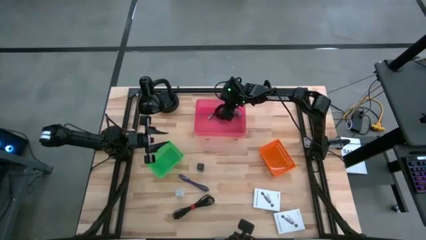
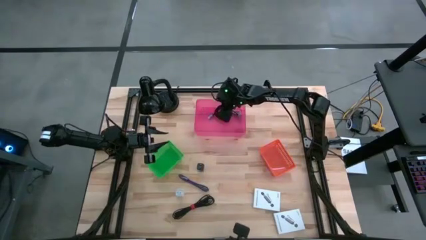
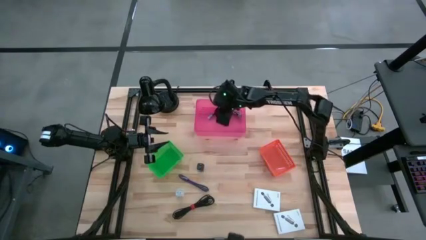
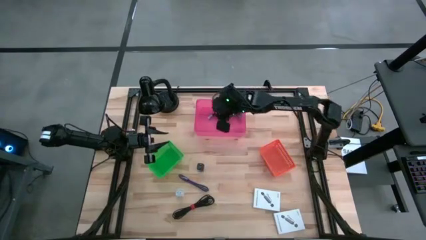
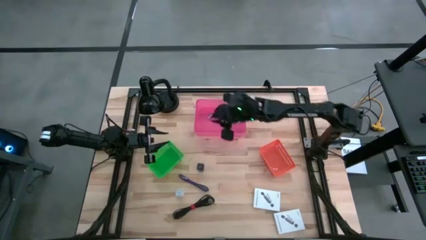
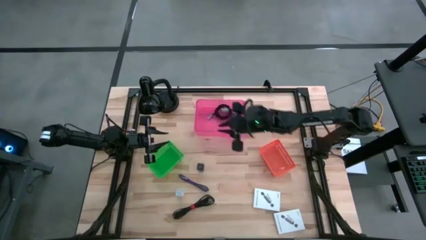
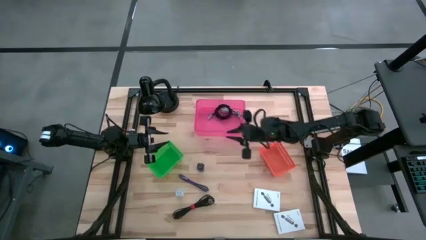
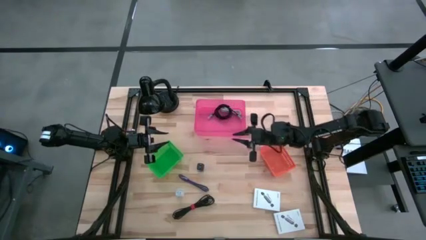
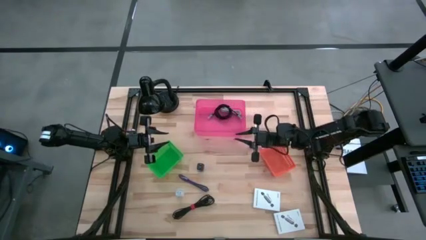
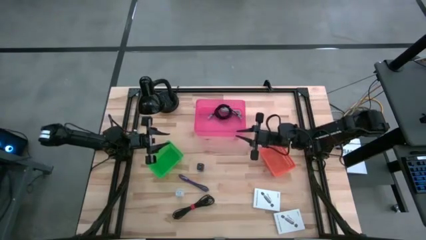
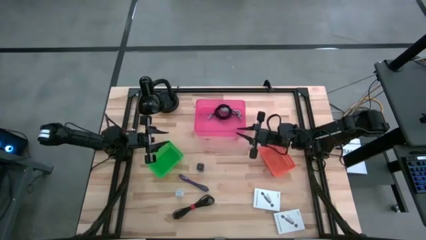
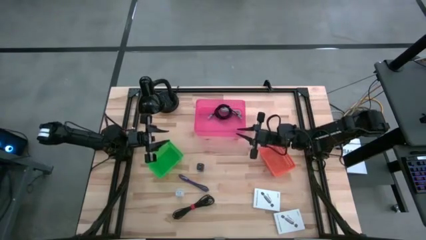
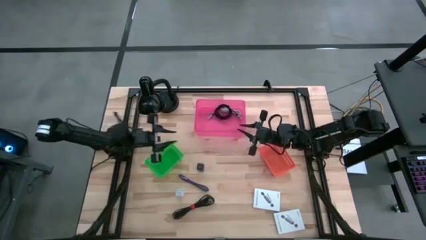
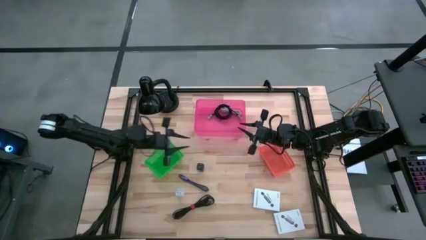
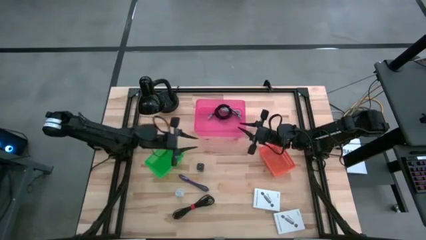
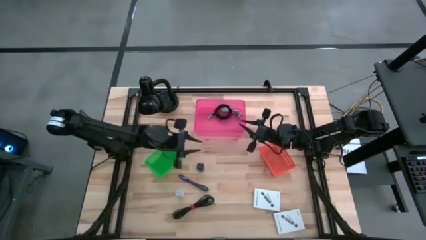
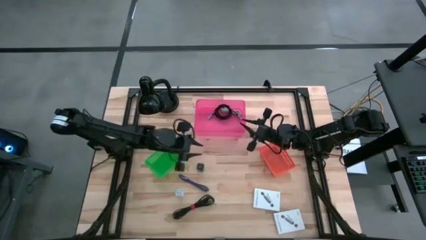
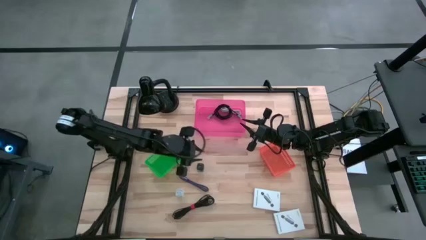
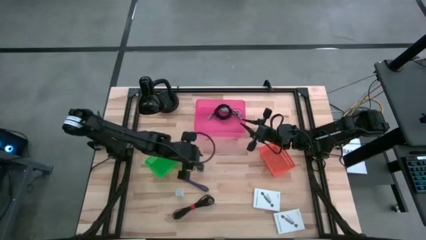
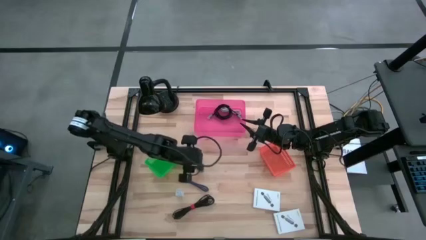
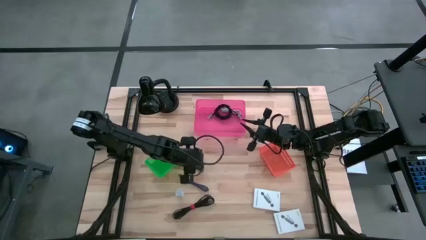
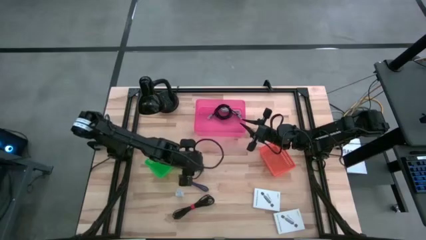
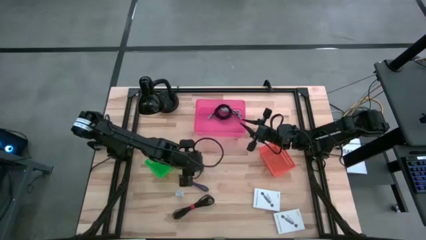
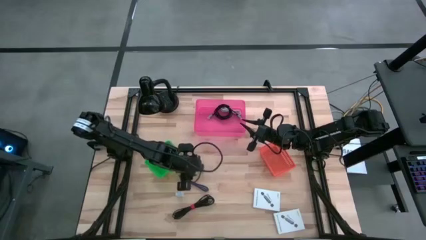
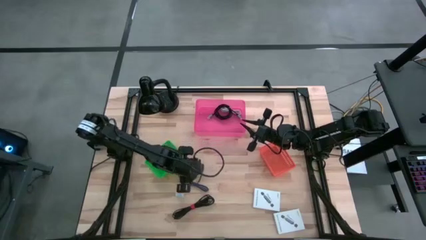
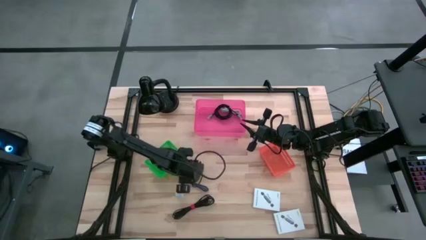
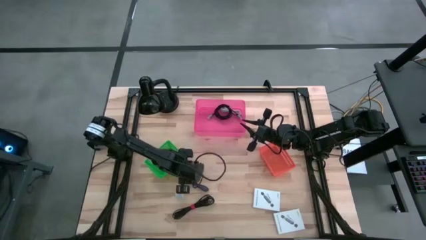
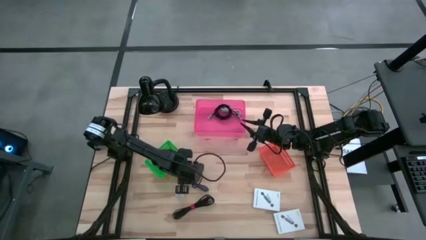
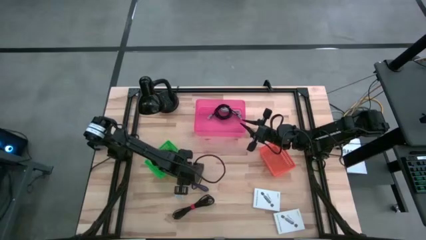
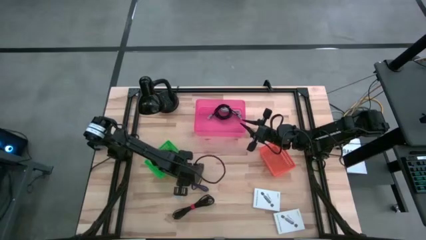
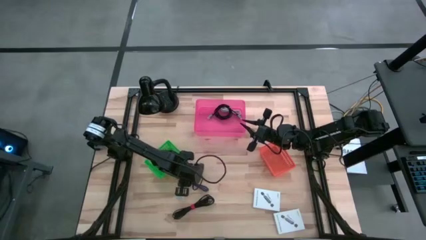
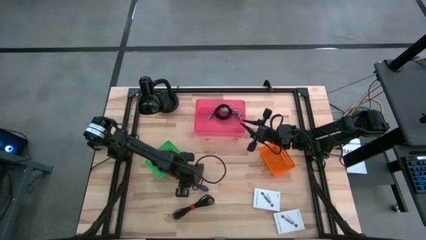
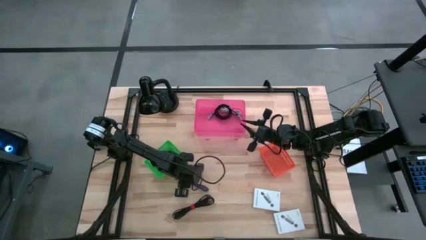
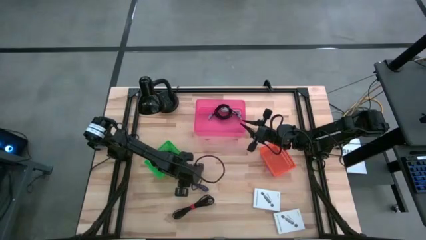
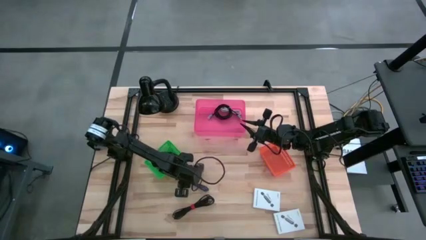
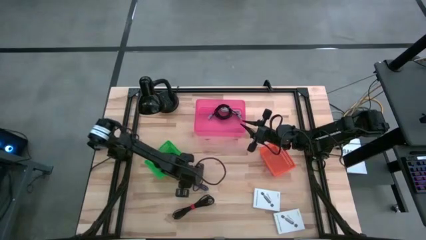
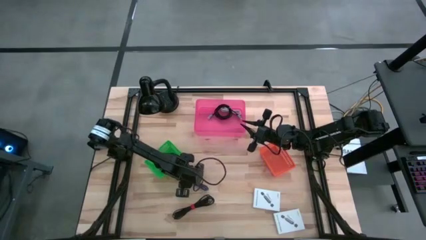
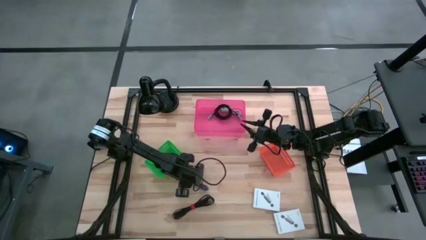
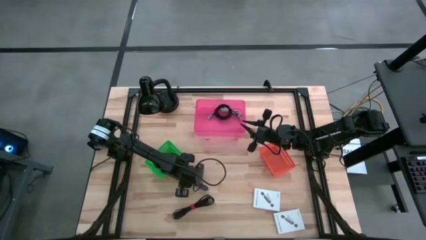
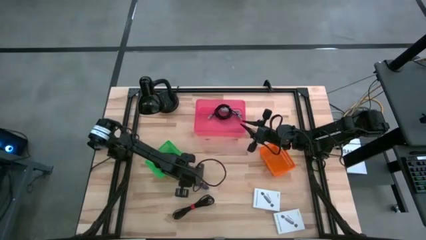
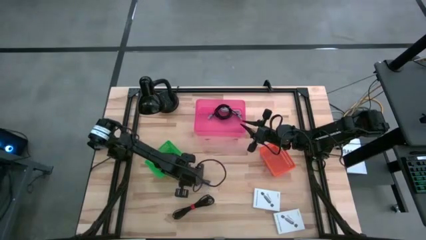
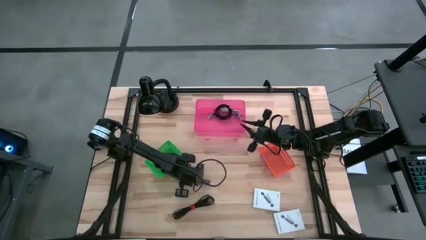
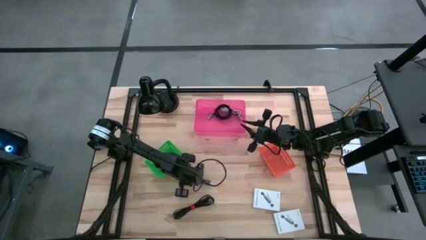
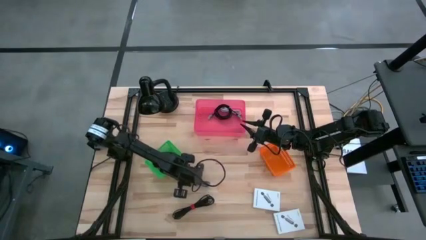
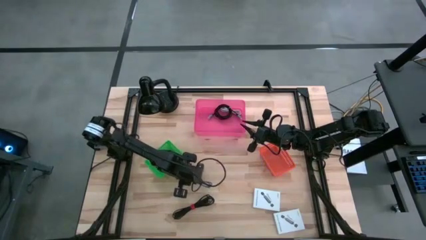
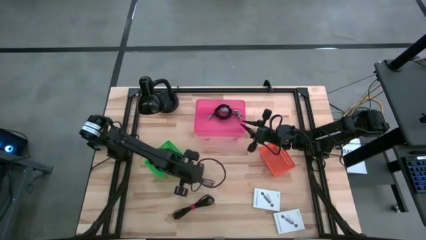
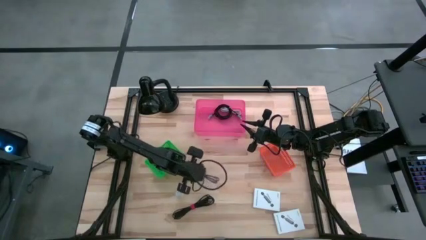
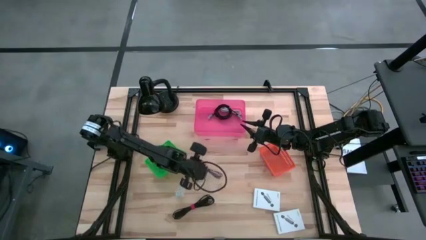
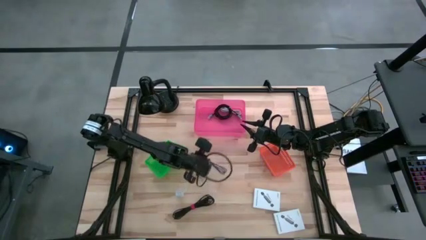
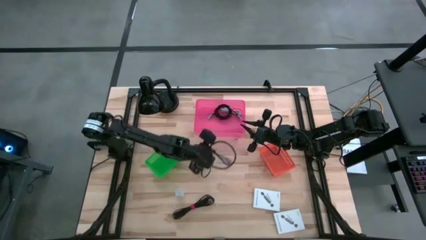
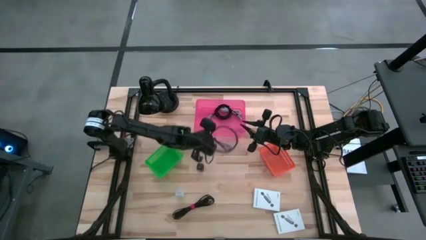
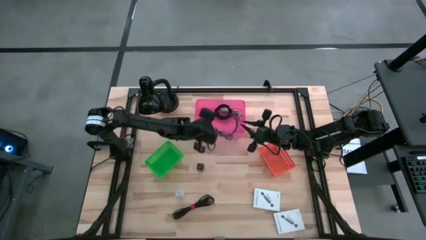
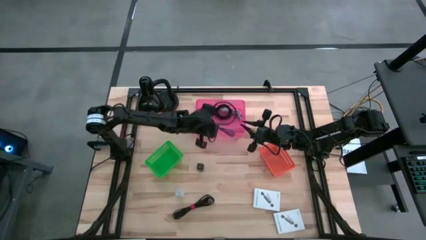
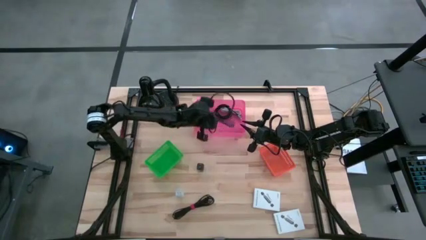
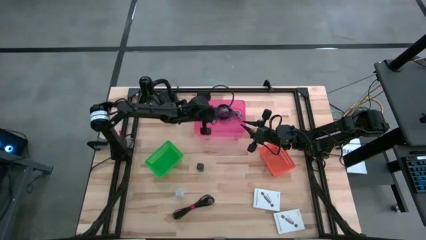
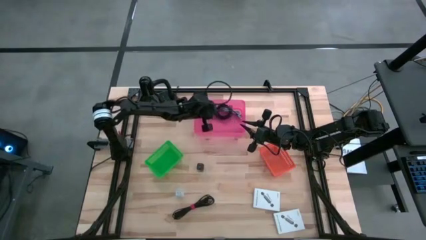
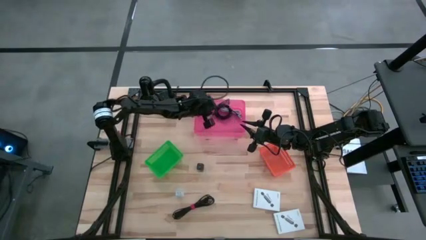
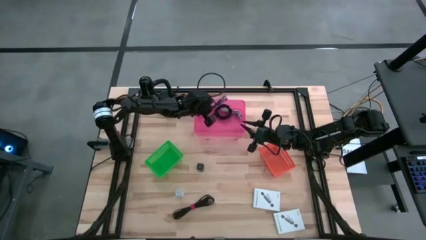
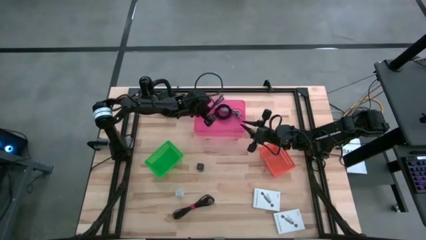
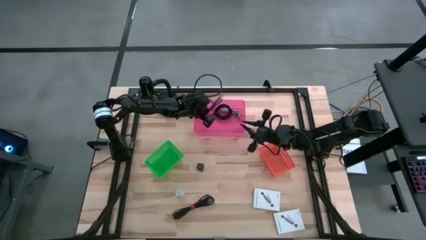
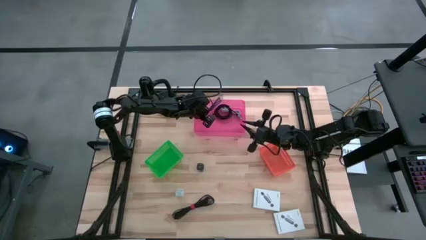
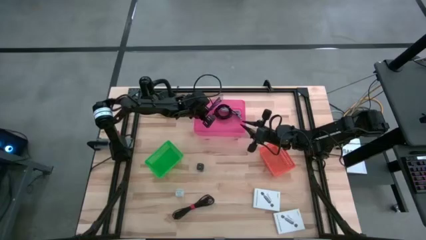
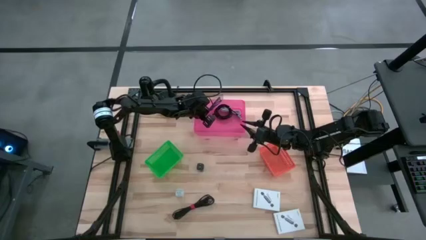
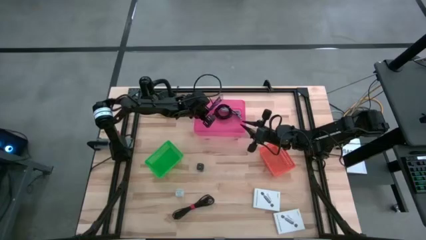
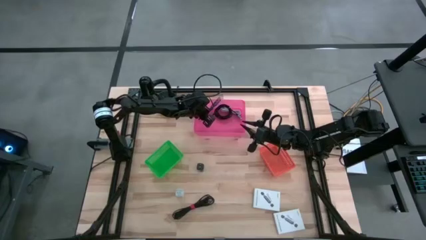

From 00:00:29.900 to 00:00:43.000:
Task: Pick and place items into bin
Put the blue charger cable into the pink bin
